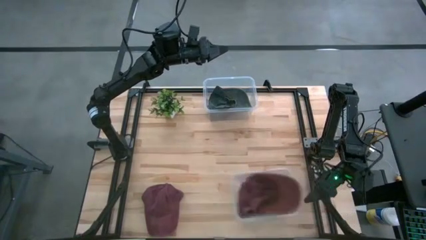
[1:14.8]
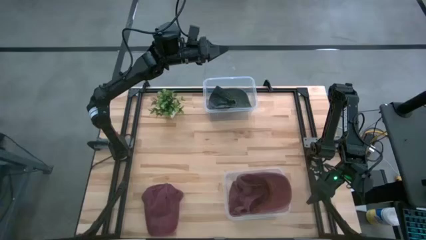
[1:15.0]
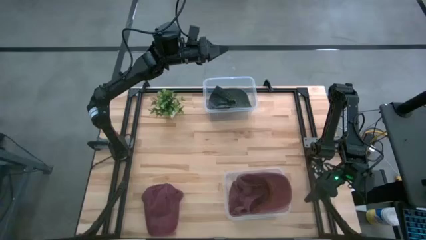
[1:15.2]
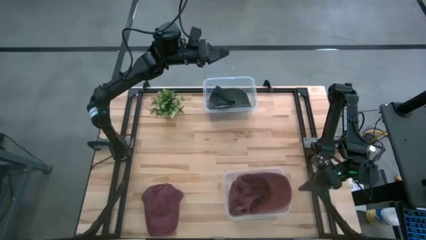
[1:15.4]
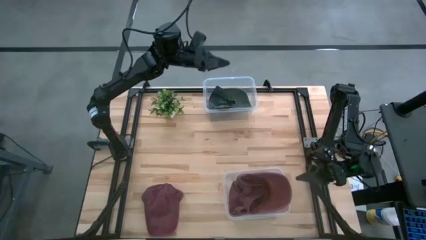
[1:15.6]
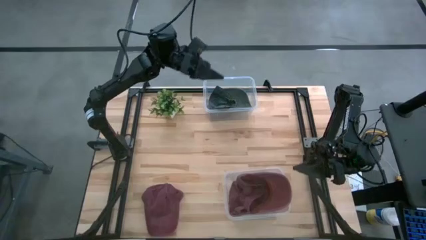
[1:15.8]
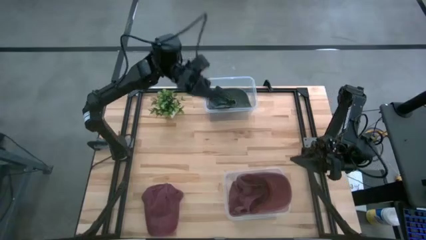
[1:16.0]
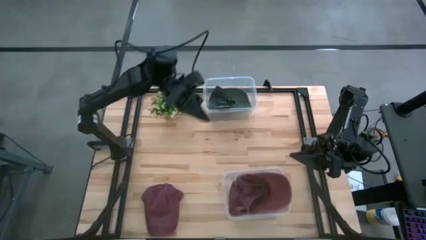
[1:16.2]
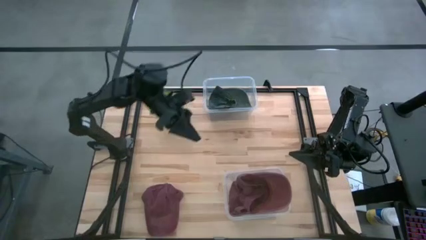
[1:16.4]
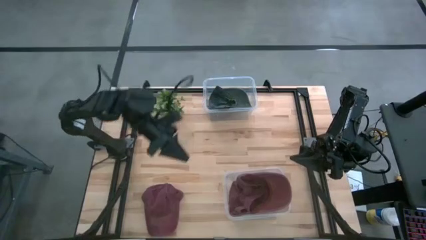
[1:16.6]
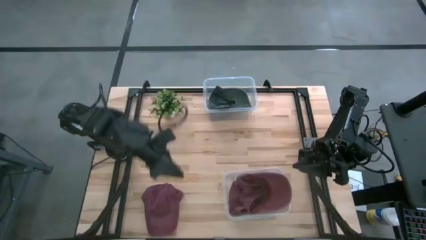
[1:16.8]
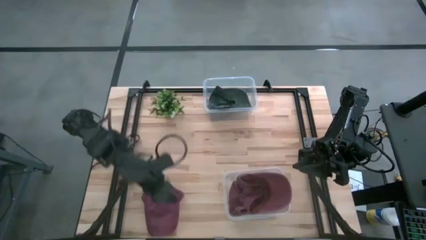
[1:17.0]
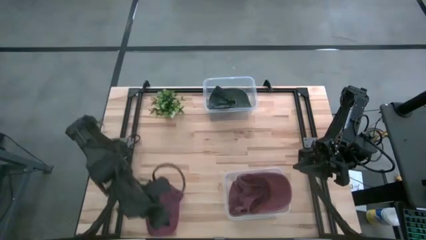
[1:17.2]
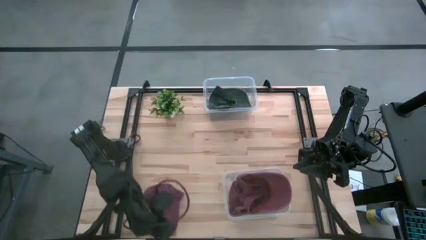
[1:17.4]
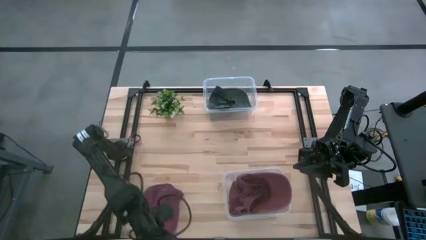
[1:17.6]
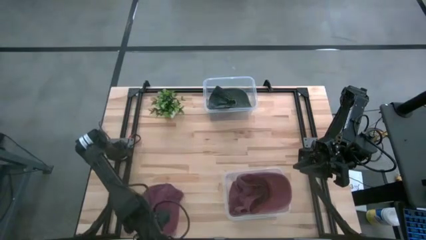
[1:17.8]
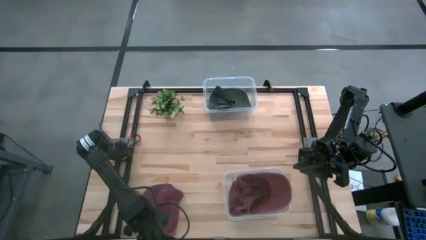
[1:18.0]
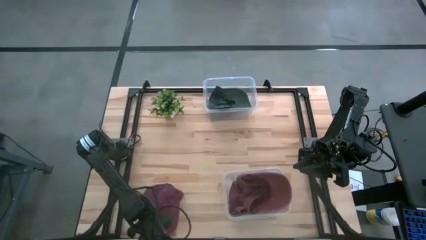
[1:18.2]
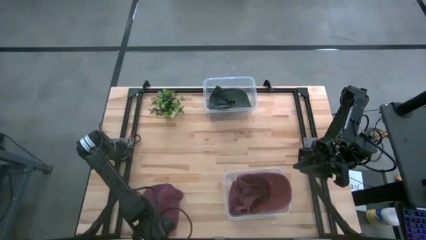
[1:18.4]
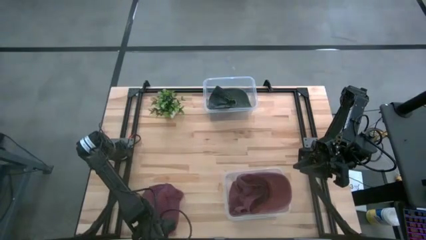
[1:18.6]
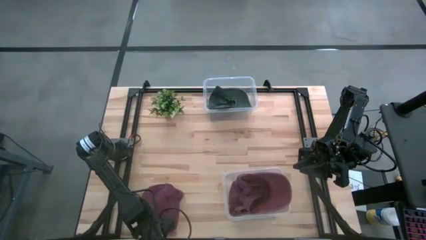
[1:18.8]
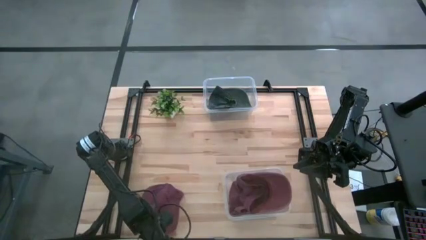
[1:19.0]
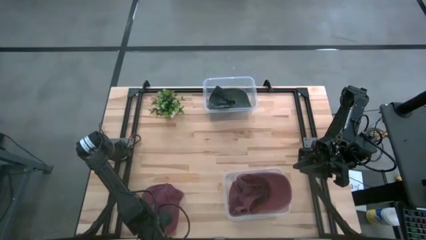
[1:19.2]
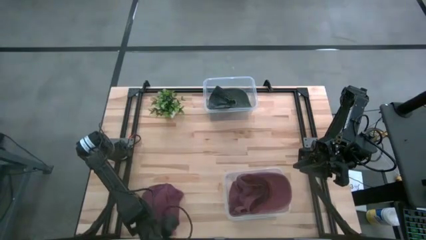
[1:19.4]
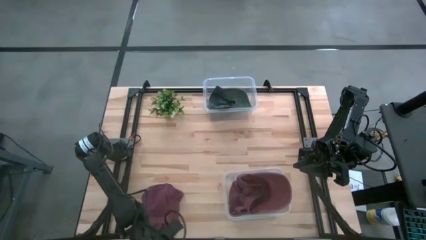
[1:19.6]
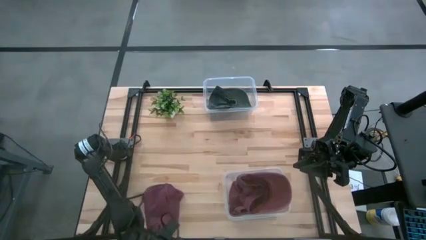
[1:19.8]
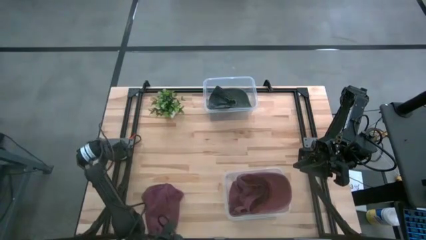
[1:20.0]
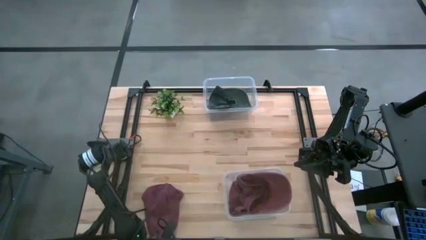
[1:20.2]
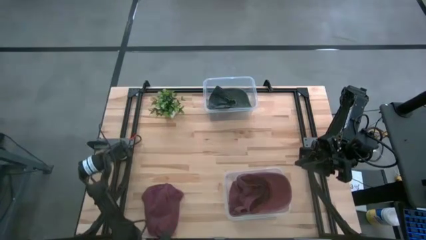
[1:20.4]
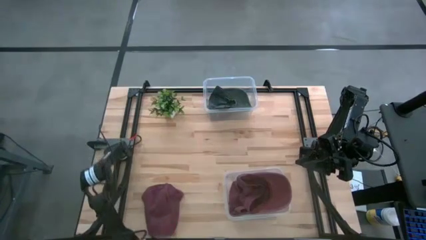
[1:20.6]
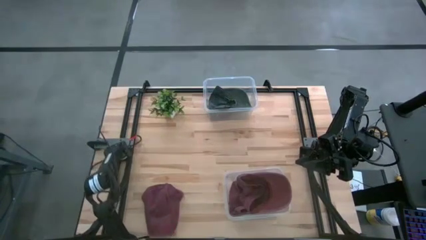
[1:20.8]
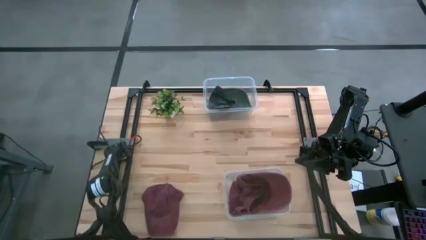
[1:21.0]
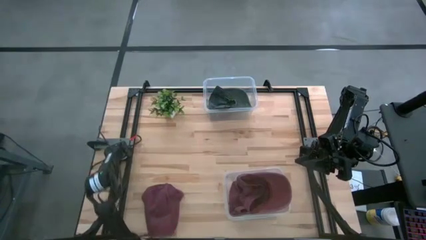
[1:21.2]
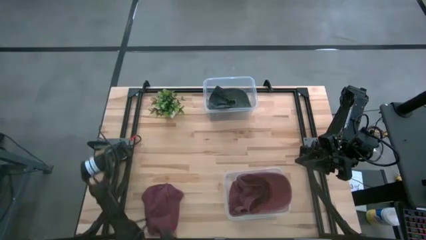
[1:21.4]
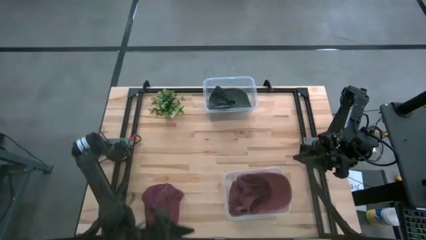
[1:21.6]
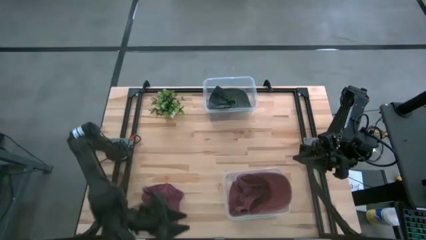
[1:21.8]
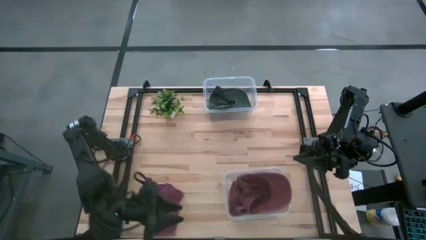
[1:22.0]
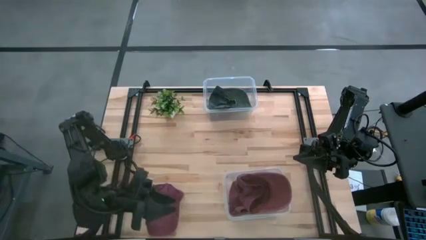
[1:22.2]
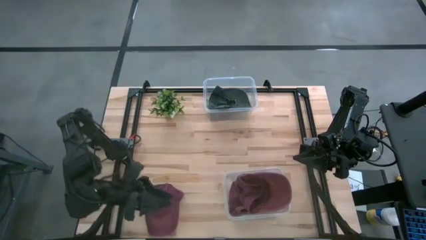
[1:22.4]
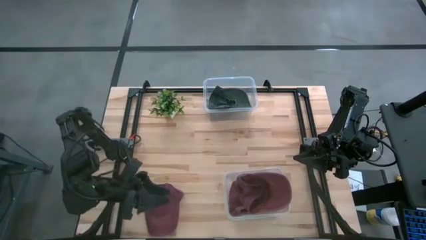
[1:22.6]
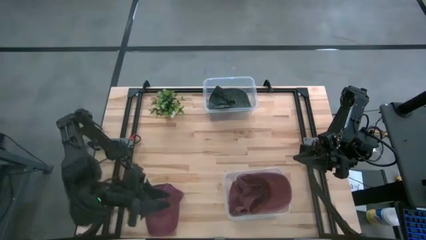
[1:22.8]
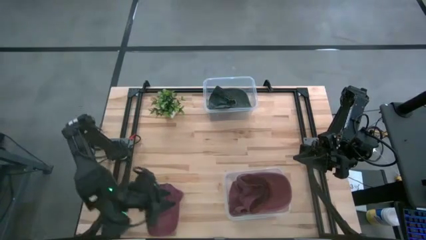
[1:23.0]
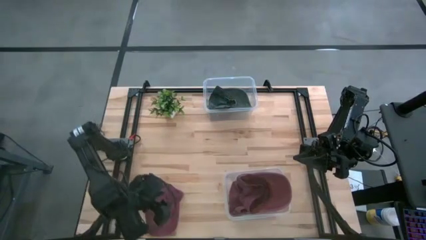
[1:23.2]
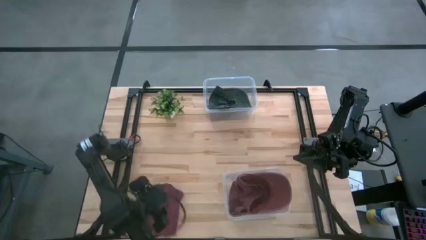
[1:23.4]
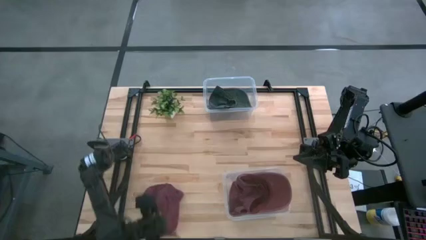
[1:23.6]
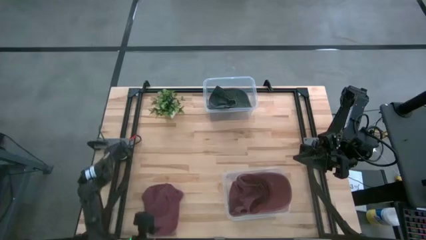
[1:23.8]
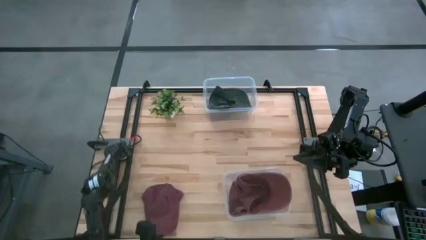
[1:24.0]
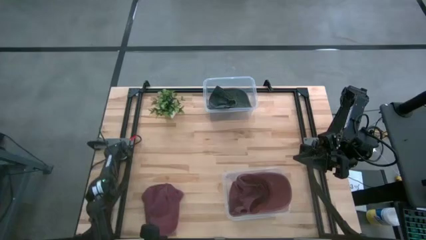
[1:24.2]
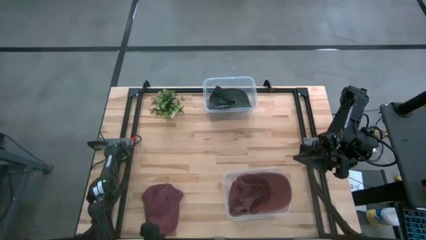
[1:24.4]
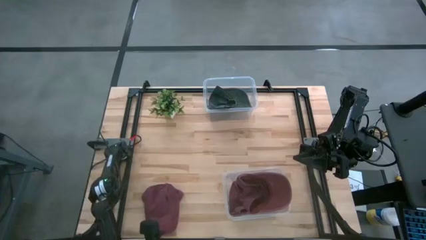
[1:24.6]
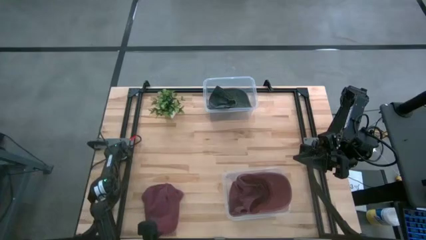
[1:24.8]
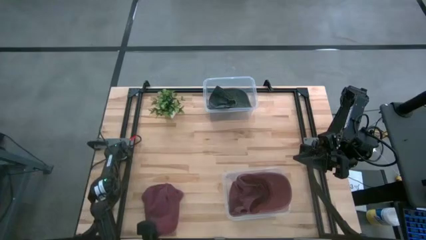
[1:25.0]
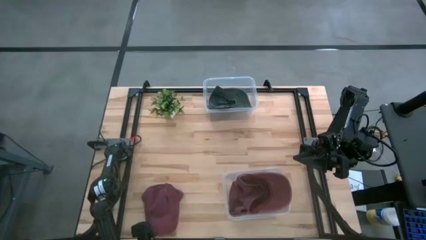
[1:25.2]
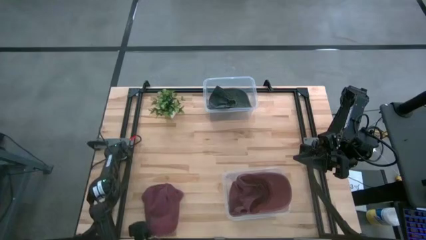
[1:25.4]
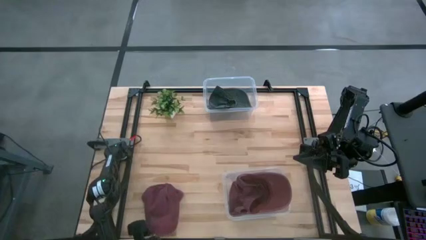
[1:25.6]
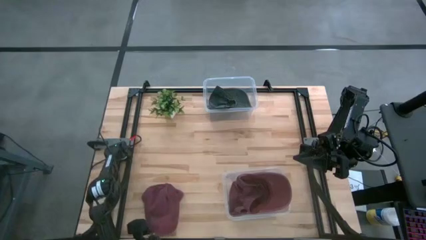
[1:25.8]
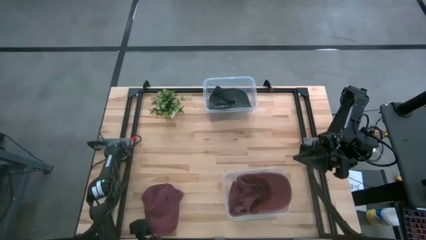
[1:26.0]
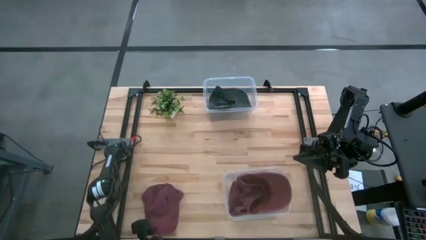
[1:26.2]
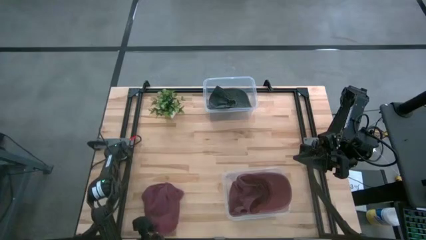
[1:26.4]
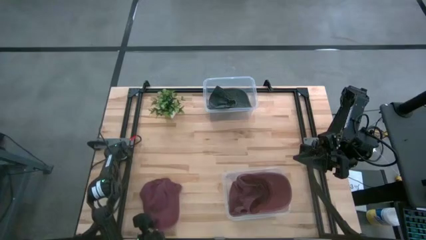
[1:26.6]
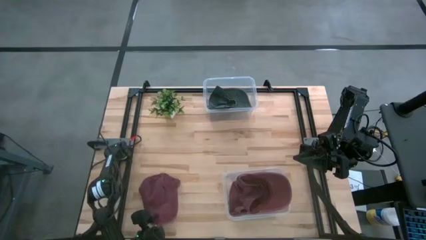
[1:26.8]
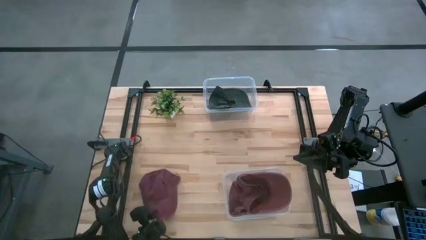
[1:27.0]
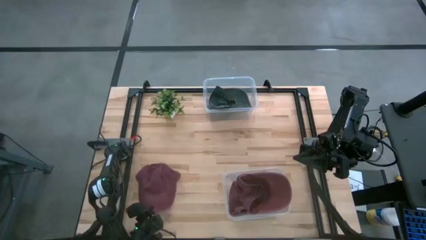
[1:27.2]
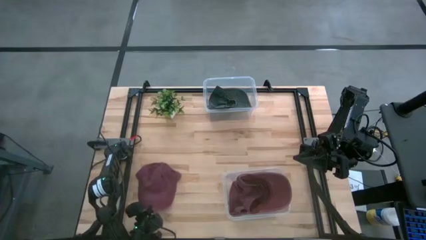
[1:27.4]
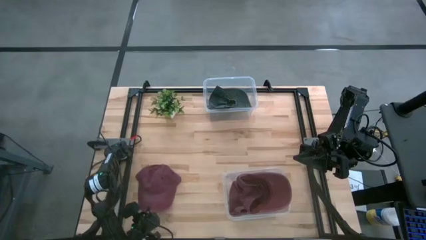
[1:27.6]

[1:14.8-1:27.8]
Task: Pick & Place hat
Put the maroon cap into the bottom transparent bin
